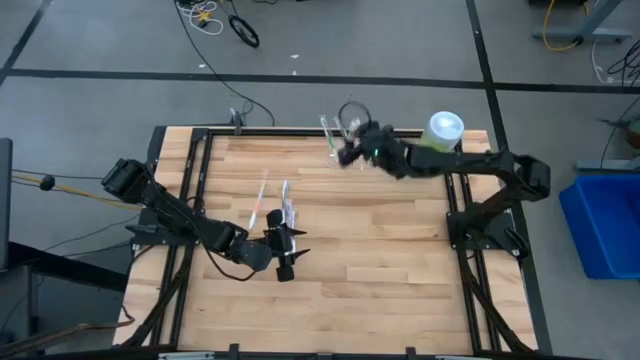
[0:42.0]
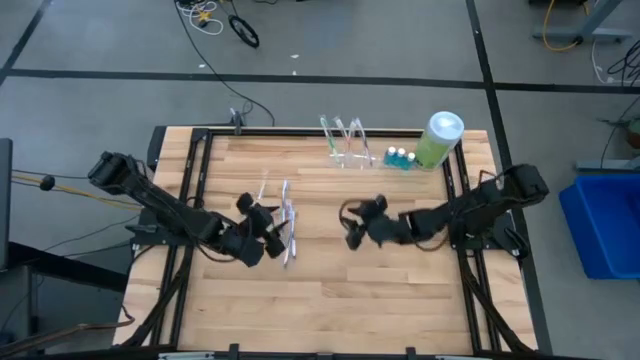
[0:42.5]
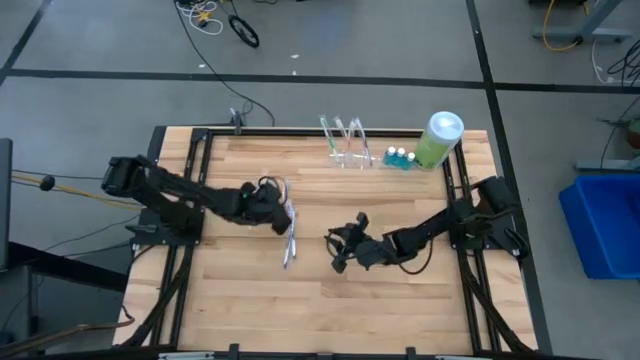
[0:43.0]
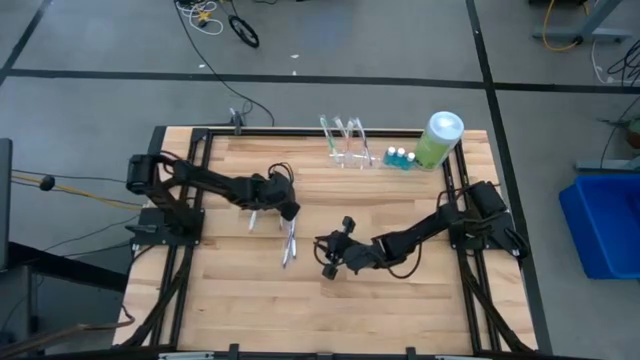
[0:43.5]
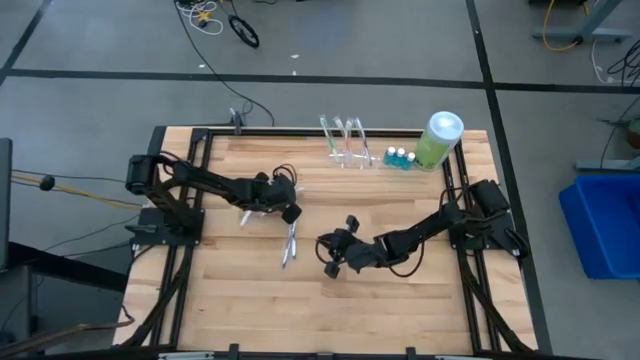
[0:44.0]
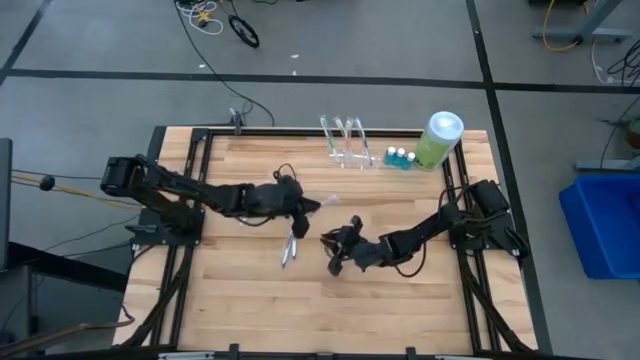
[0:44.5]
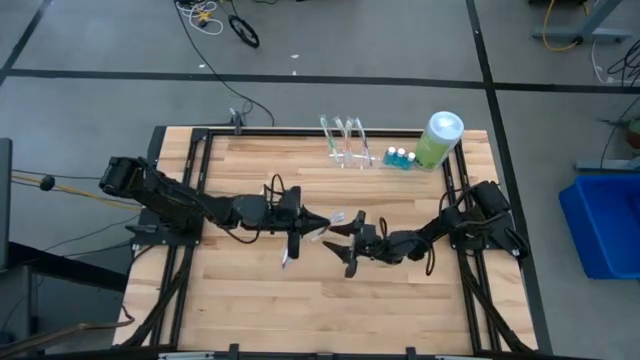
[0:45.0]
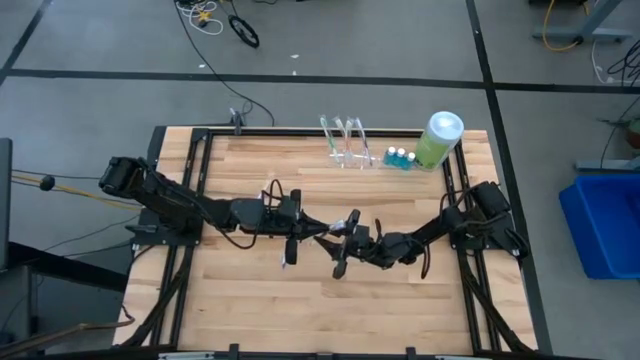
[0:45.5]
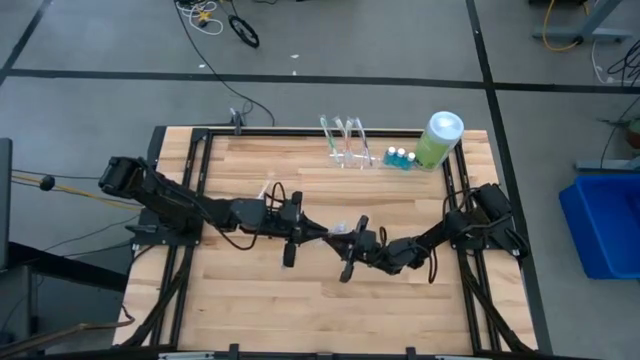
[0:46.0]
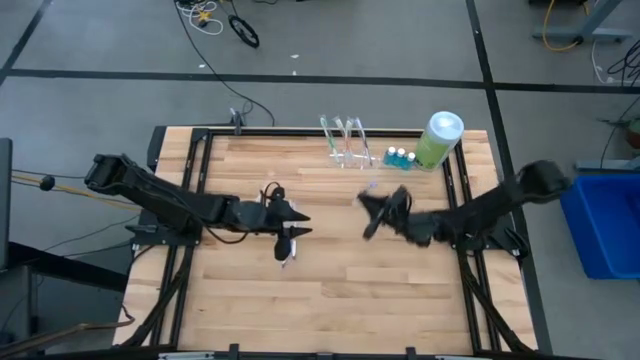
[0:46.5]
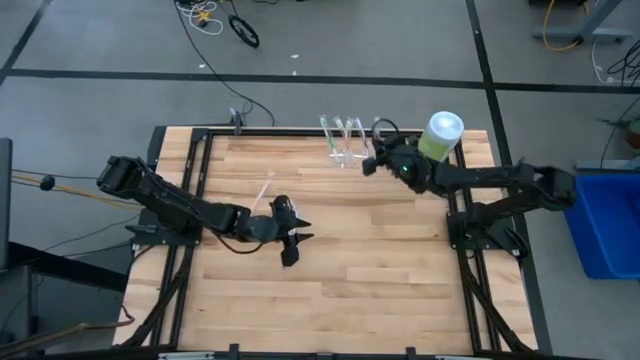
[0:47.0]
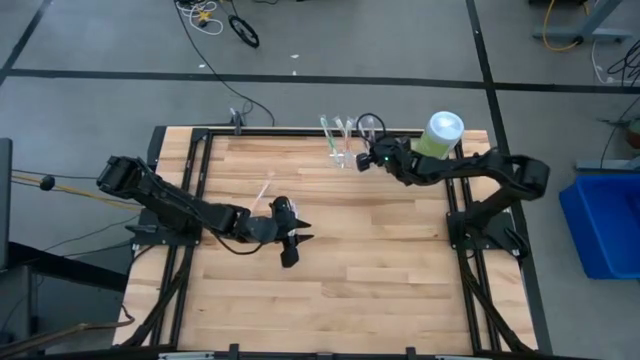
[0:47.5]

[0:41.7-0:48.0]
Task: Pick & Place toothbrushing station
Put the purple toothbrush into the right section of the transparent organizer

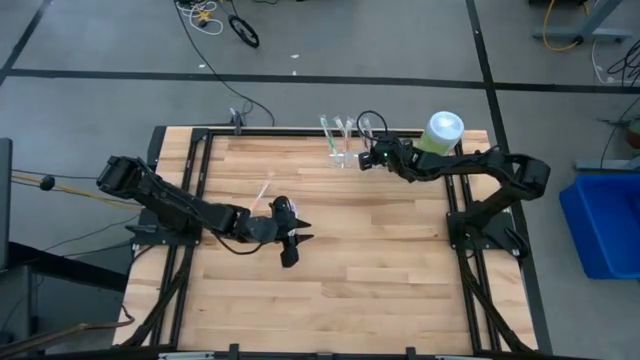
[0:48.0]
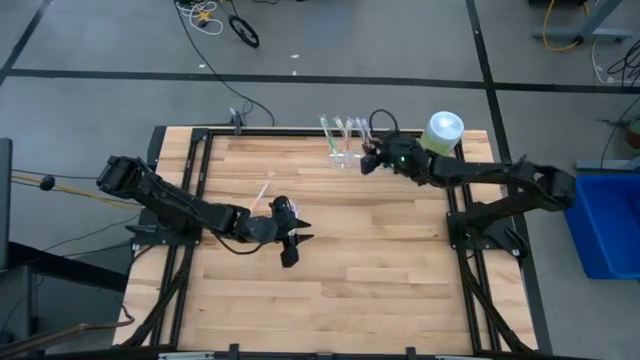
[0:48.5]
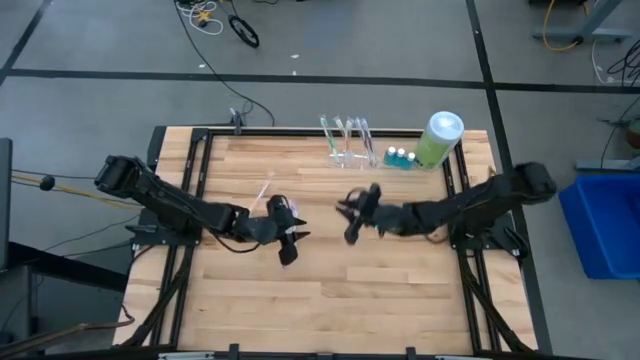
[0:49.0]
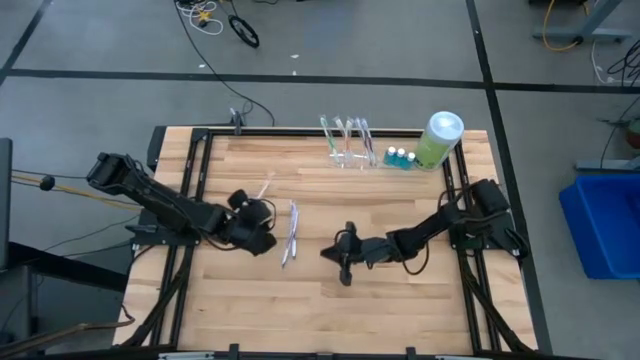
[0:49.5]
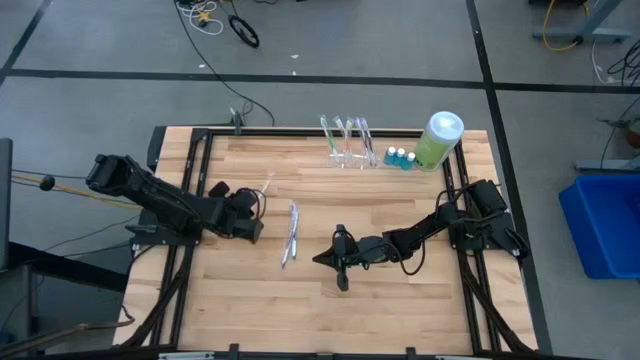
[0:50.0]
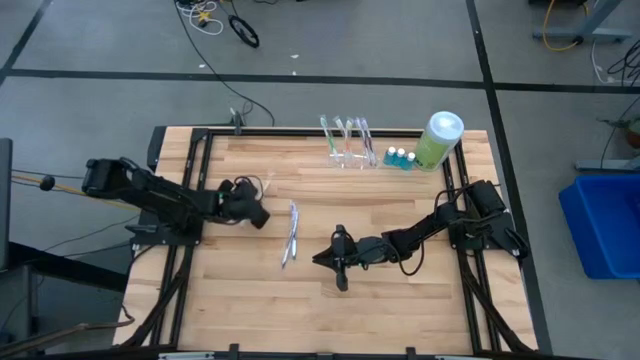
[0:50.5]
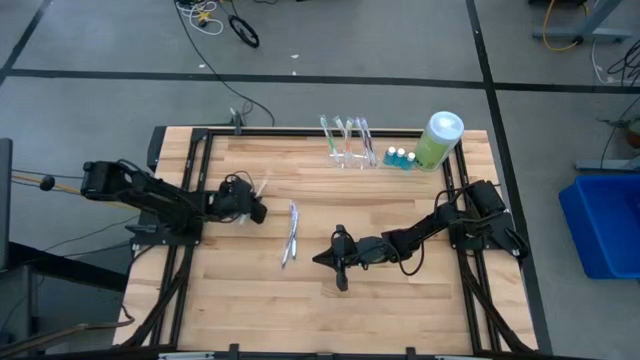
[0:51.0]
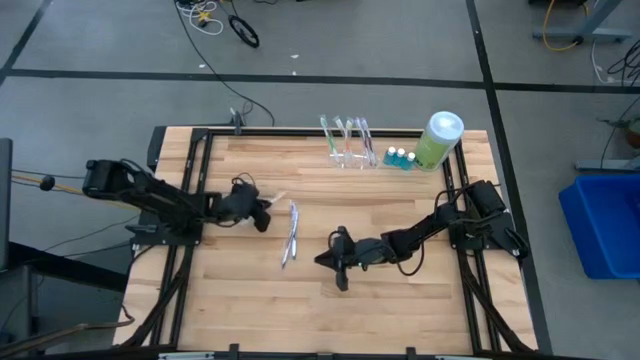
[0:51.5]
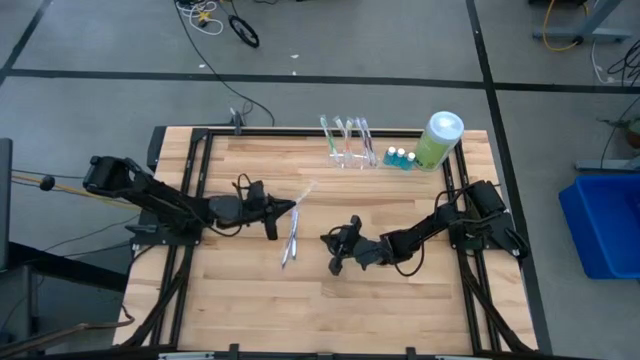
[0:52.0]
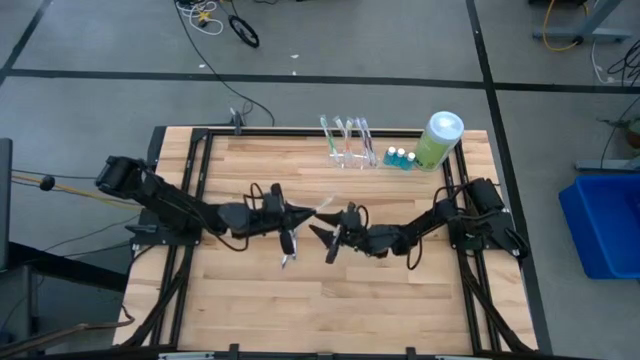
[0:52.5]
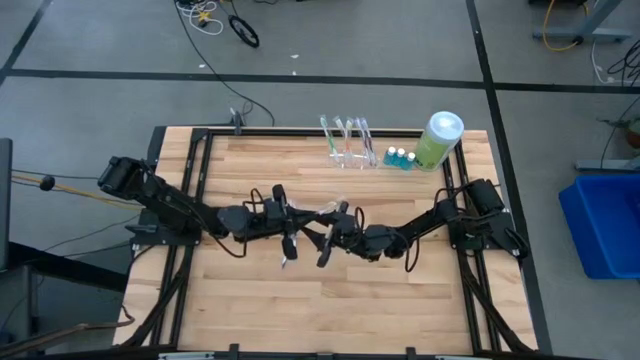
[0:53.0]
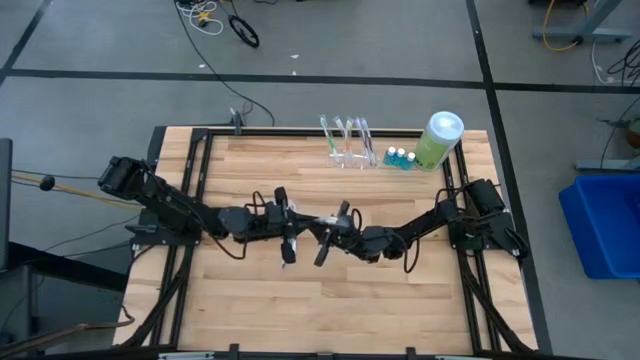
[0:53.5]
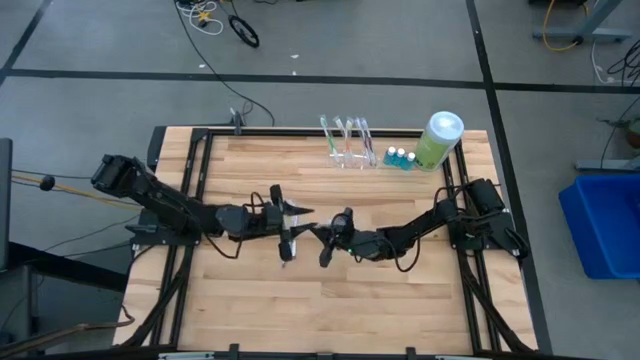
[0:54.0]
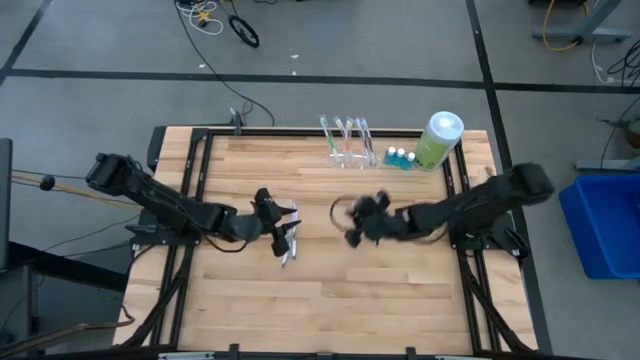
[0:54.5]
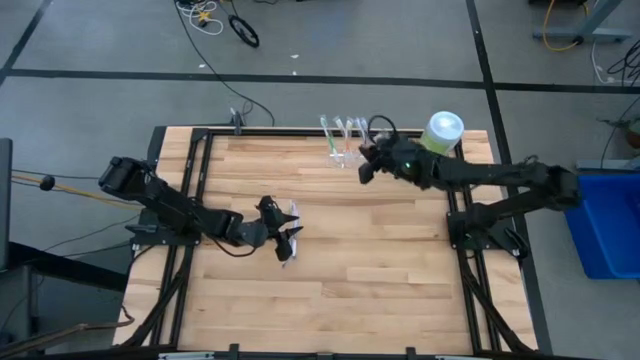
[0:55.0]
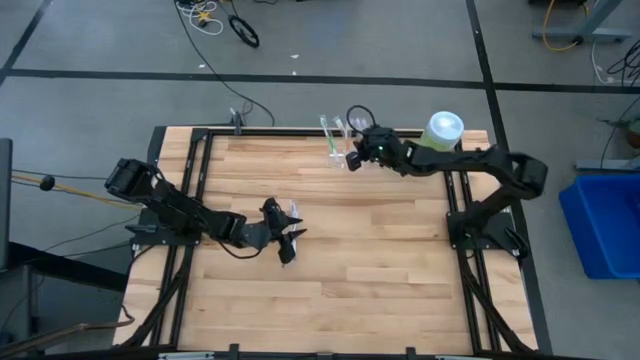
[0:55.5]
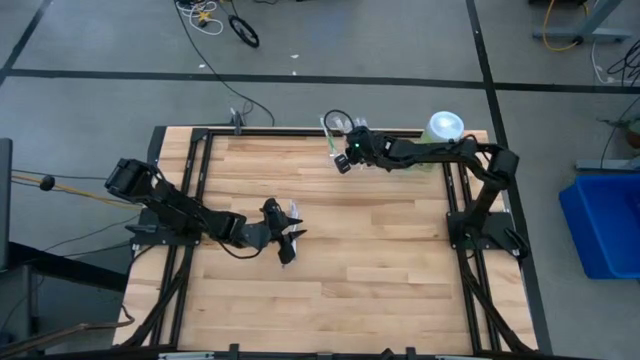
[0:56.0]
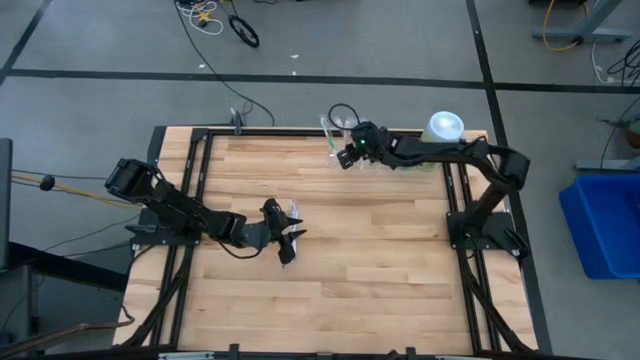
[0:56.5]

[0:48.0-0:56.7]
Put the orange toothbrush into the middle section of the transparent organizer

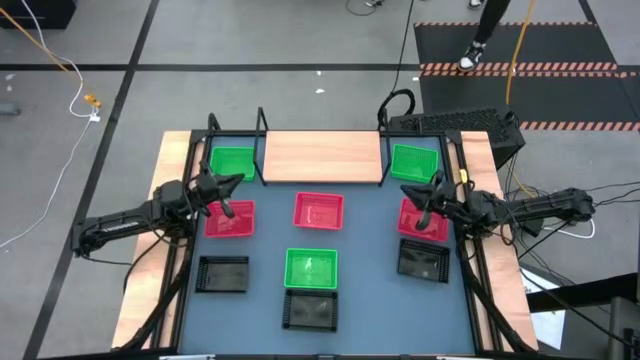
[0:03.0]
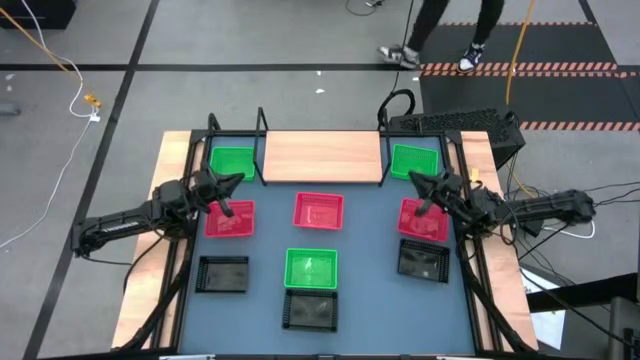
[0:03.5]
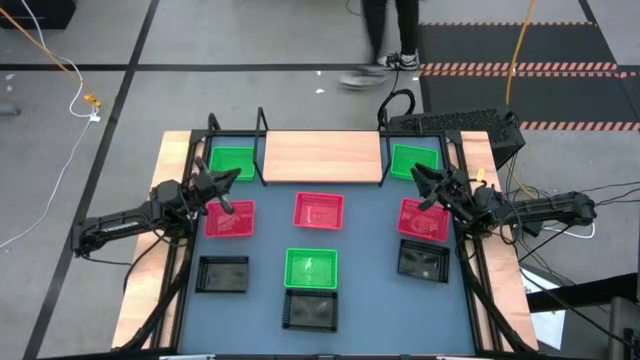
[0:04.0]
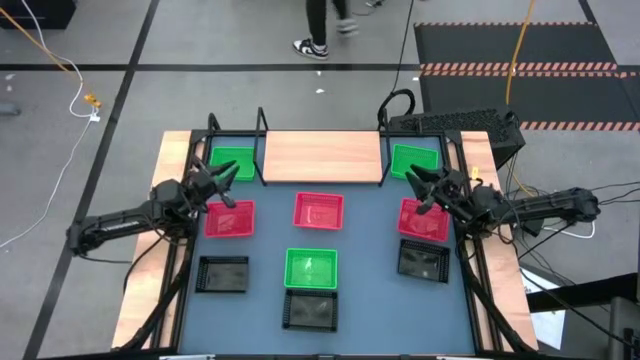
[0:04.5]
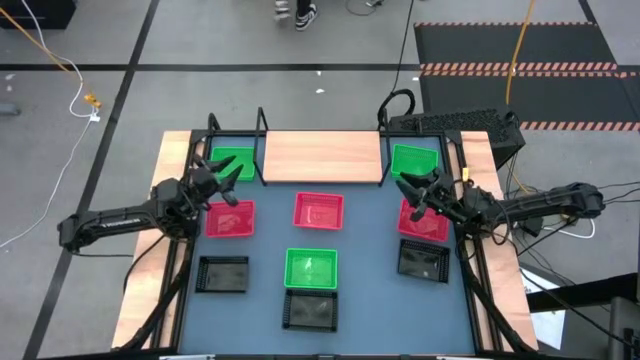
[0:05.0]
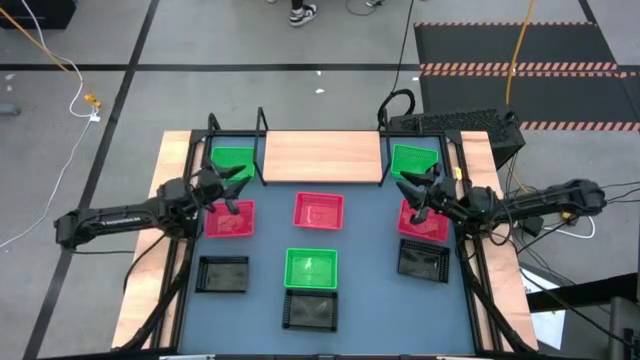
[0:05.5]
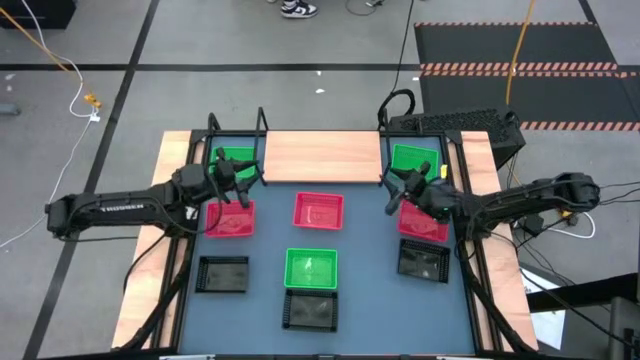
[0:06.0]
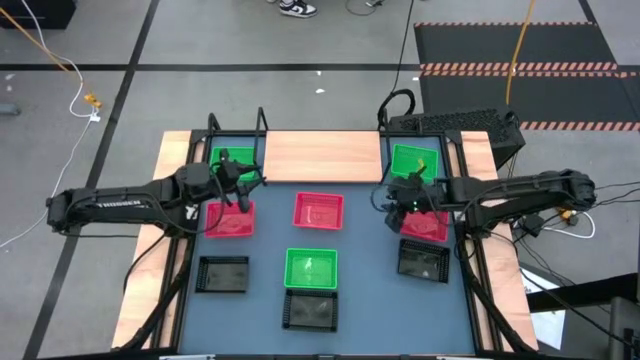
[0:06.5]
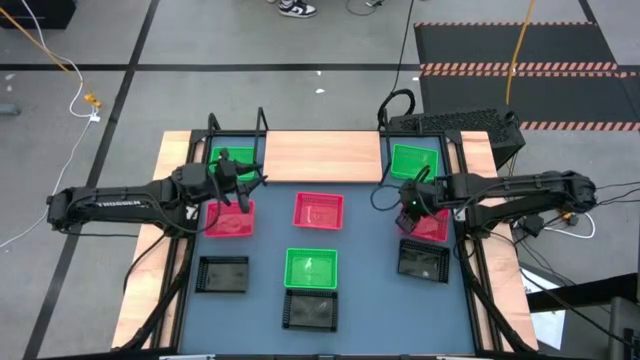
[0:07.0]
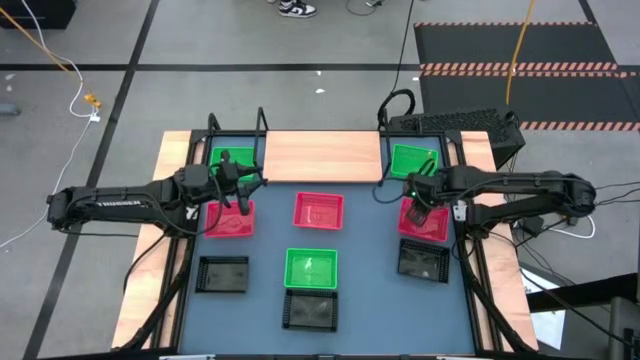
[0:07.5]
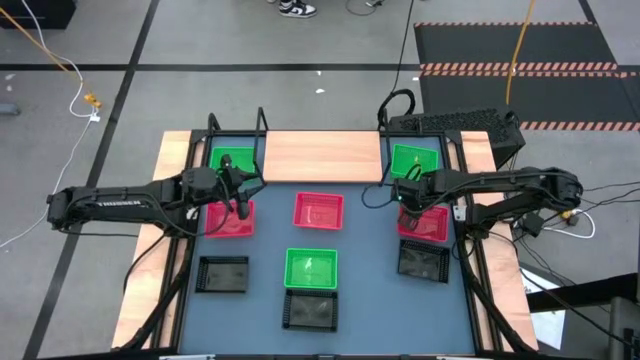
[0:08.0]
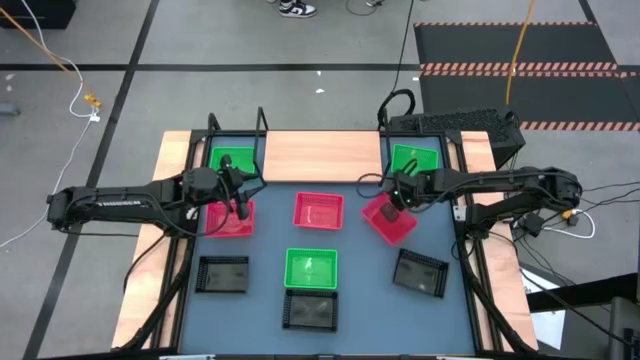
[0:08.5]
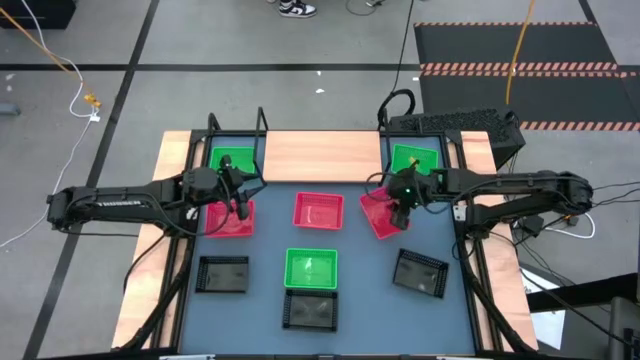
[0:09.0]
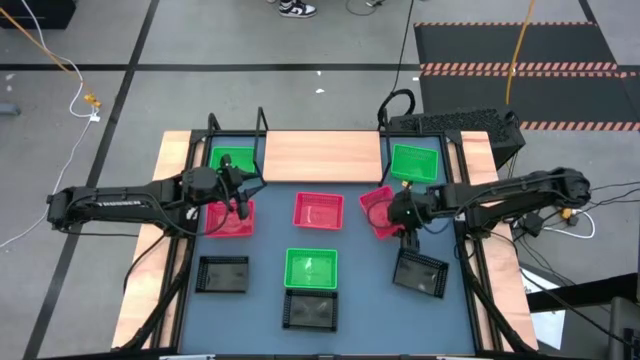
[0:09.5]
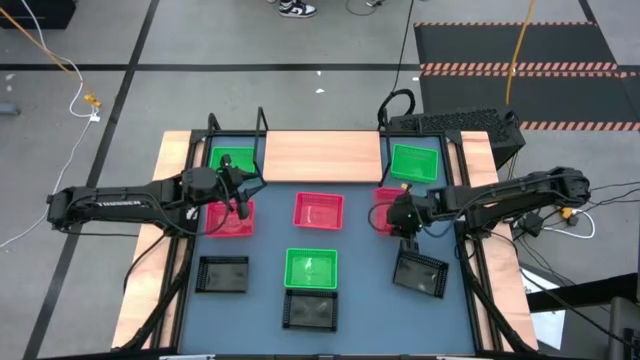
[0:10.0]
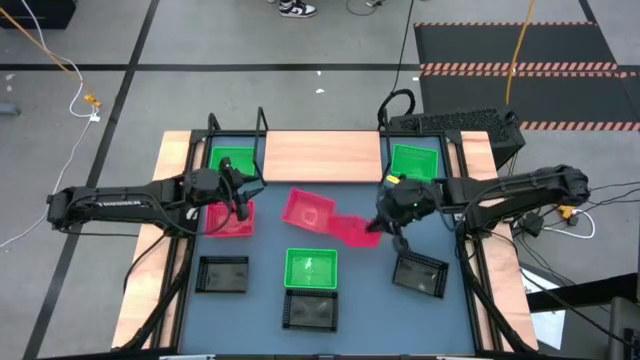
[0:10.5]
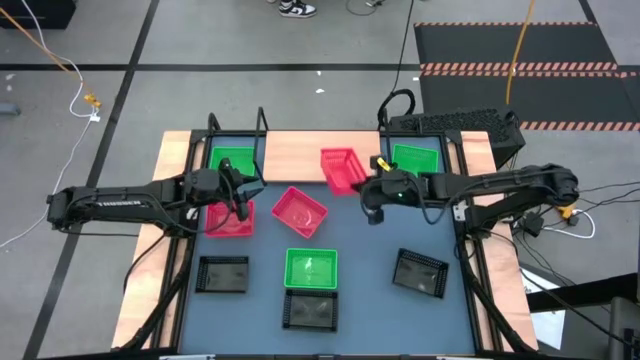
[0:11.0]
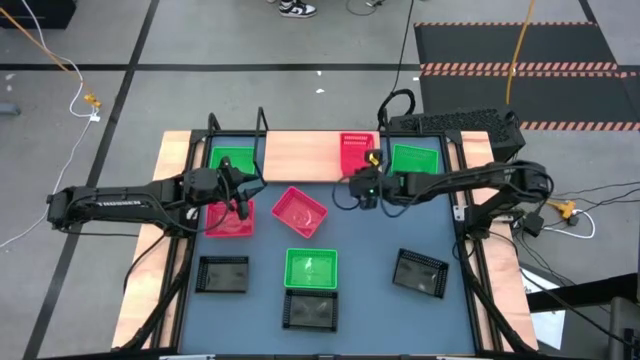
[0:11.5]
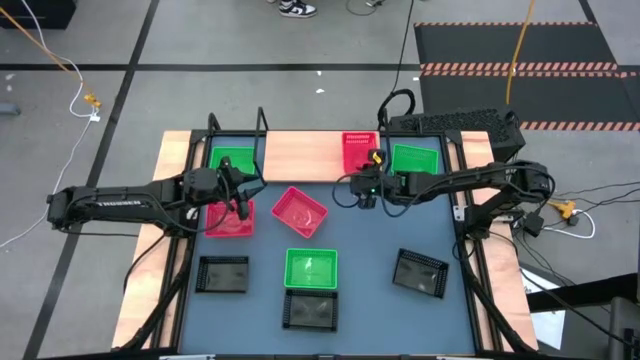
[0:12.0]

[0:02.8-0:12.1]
Task: Stack baskets on shelf by color
Put the right red bin on the shelf
